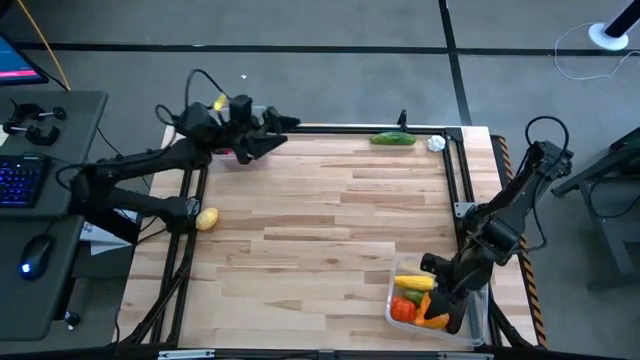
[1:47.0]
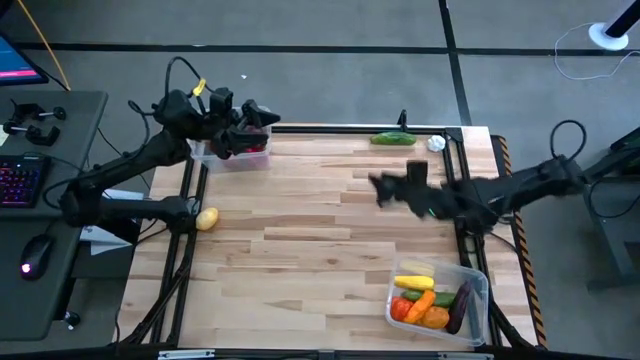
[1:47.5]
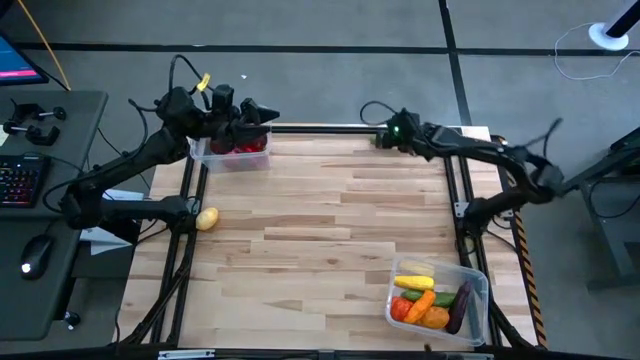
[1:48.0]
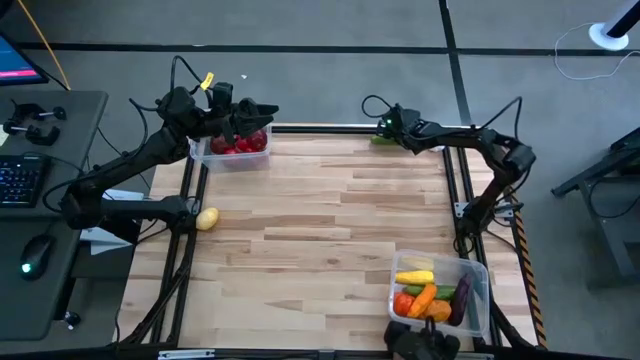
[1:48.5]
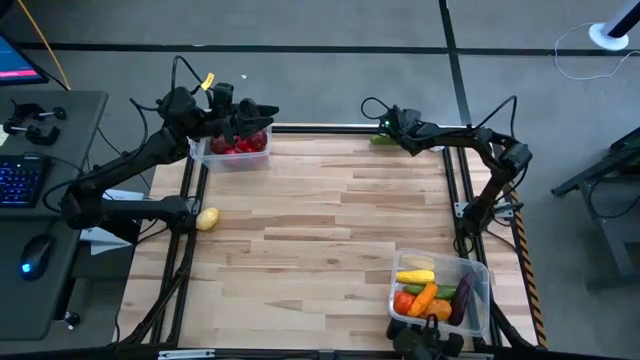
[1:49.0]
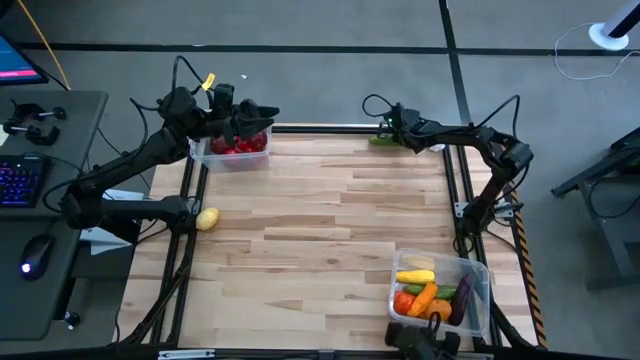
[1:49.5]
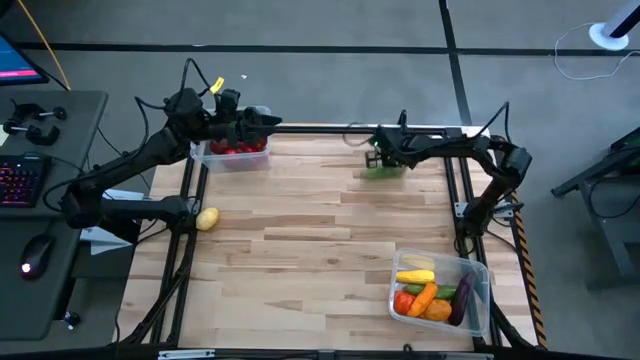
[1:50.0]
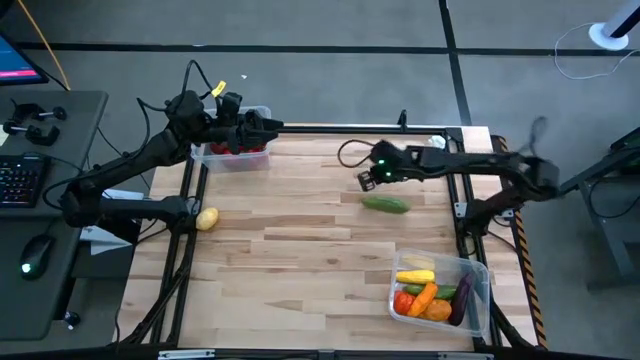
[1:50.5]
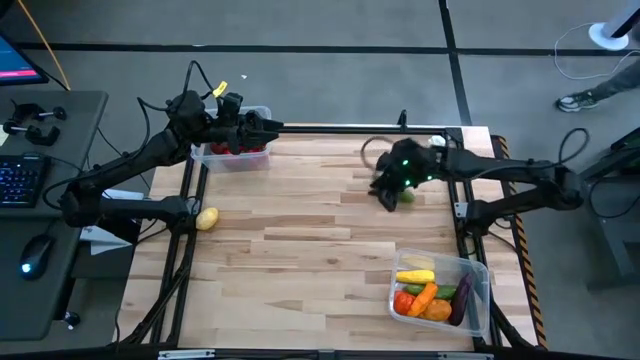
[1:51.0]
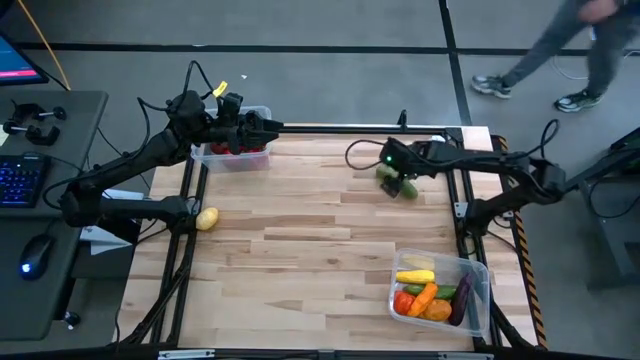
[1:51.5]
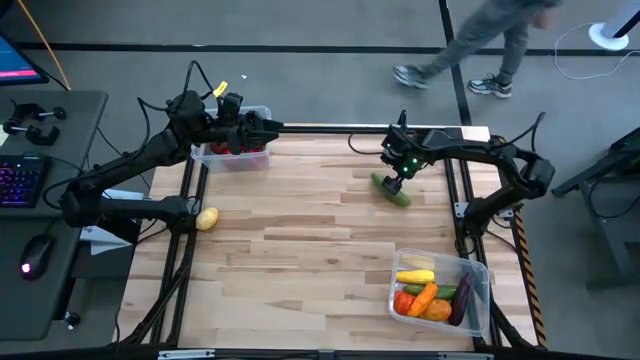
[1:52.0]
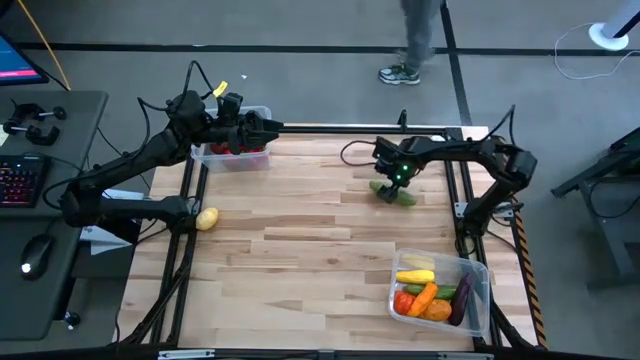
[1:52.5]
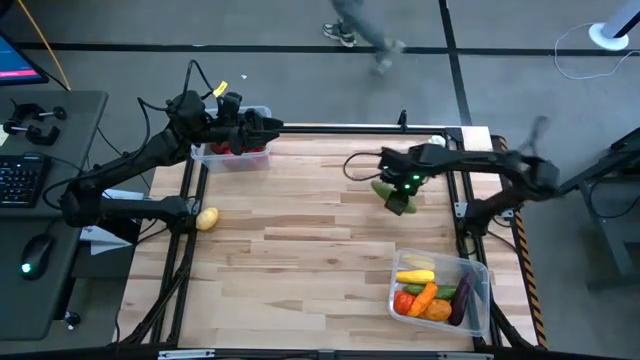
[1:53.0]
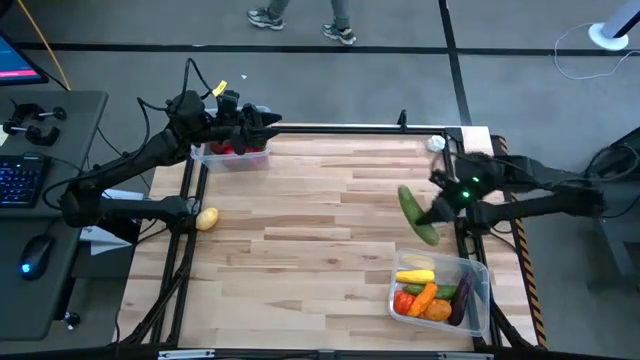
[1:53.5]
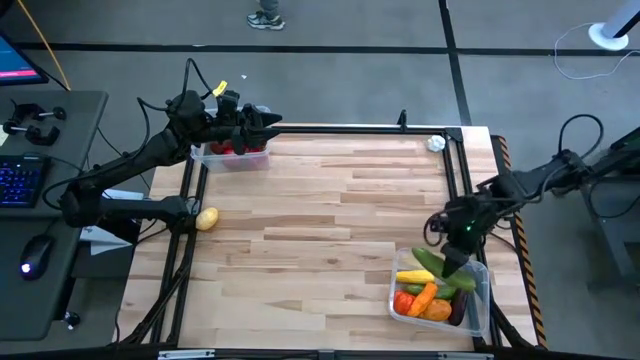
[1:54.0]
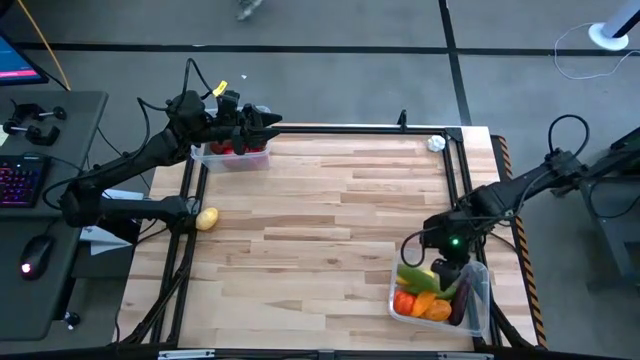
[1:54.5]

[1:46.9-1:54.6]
Task: Sort produce into baskets
Put the green cucumber into the bottom transparent bin

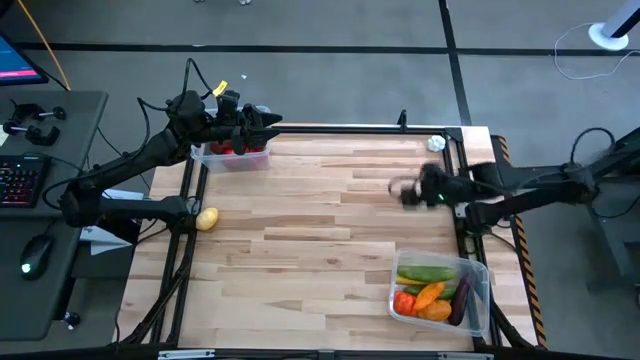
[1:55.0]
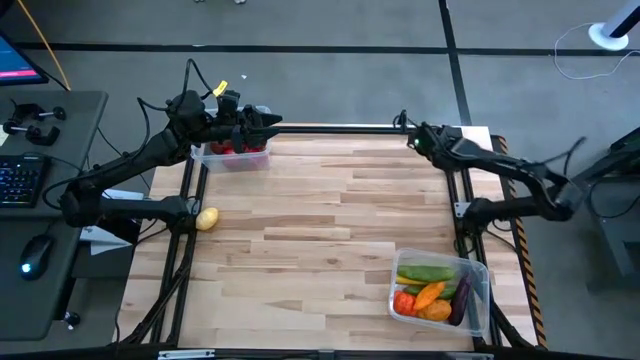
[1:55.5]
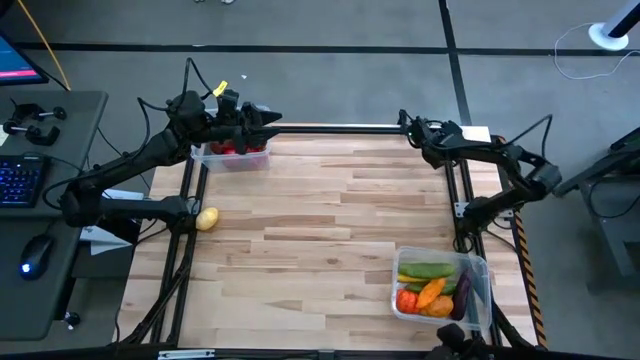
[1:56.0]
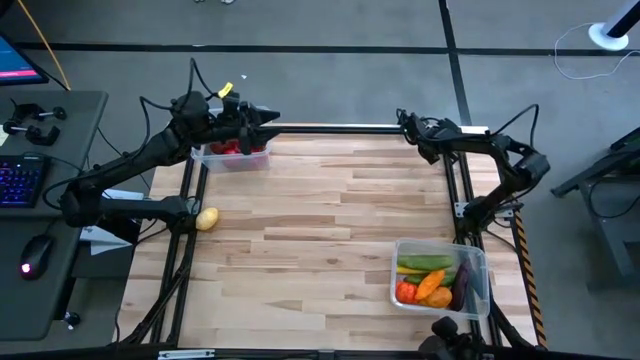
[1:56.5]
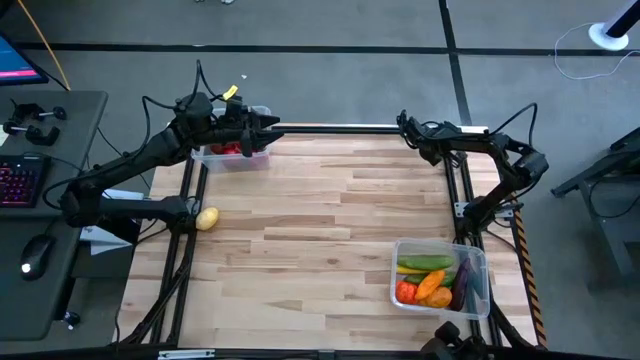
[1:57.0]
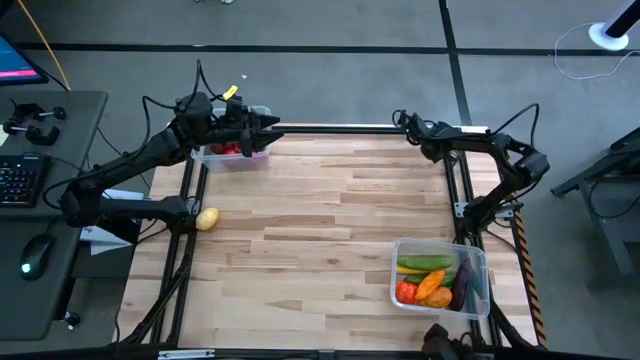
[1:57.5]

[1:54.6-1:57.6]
Put the white garlic into the bottom transparent bin

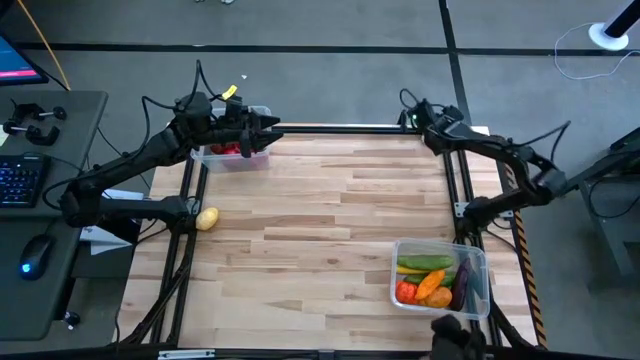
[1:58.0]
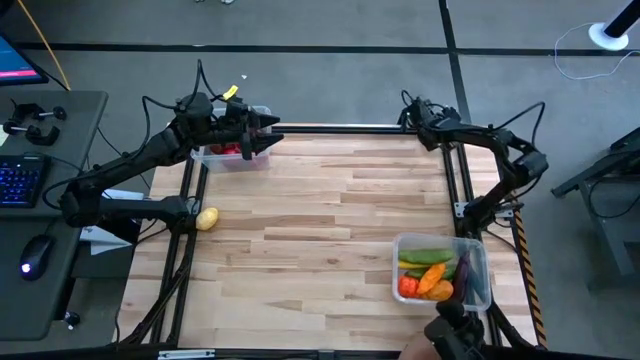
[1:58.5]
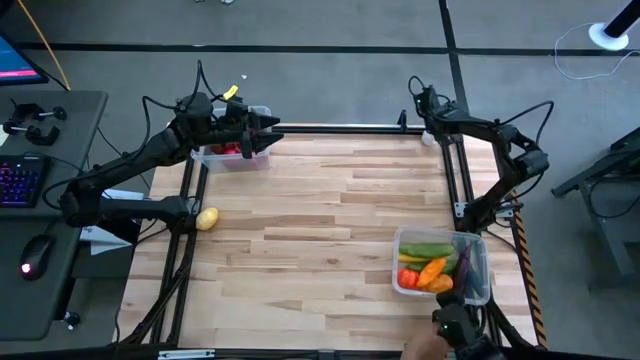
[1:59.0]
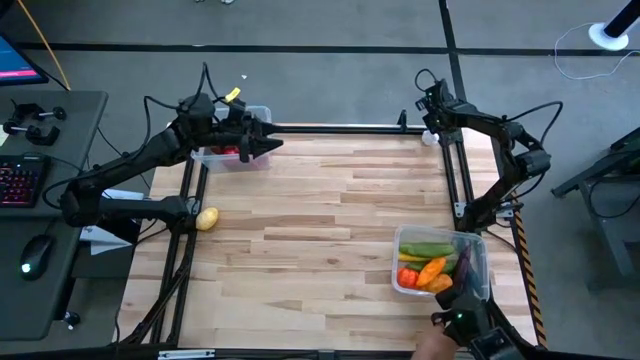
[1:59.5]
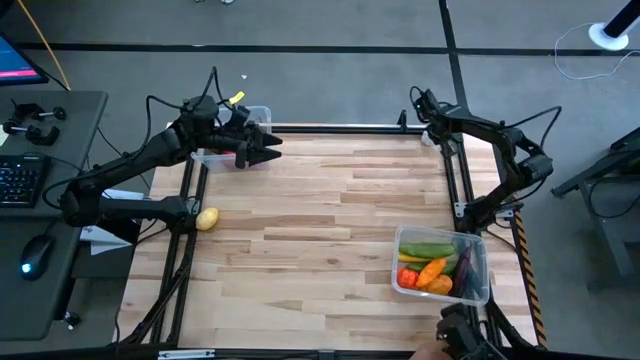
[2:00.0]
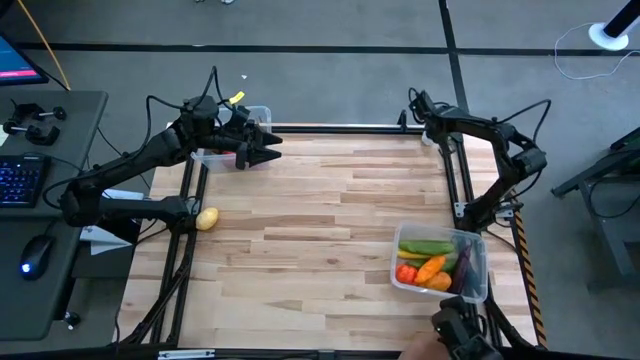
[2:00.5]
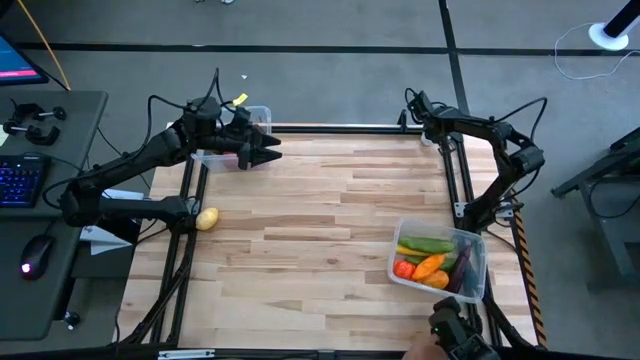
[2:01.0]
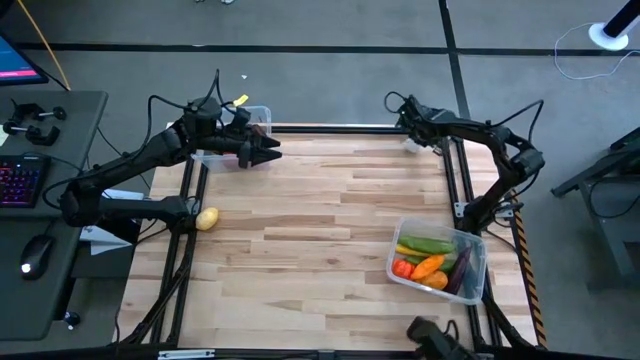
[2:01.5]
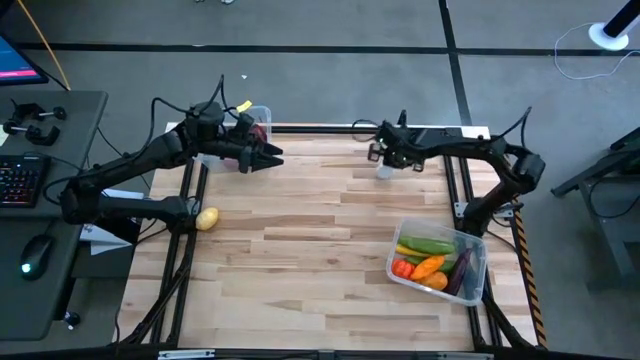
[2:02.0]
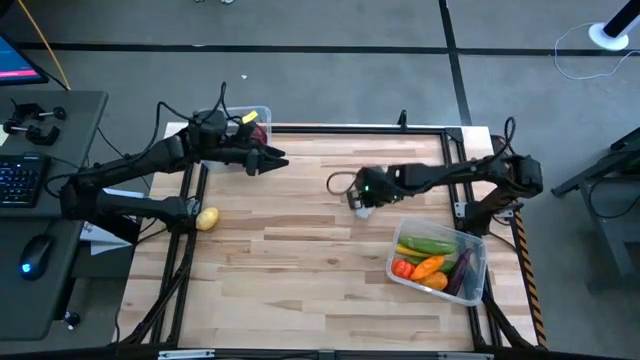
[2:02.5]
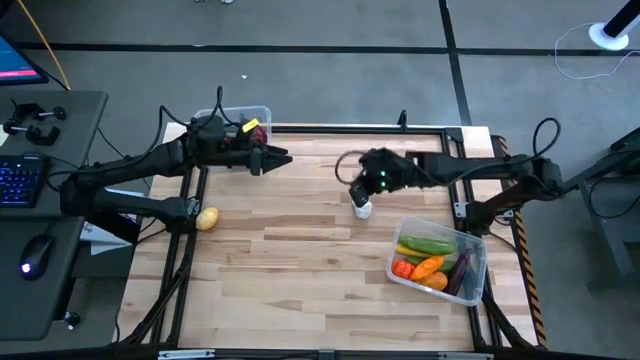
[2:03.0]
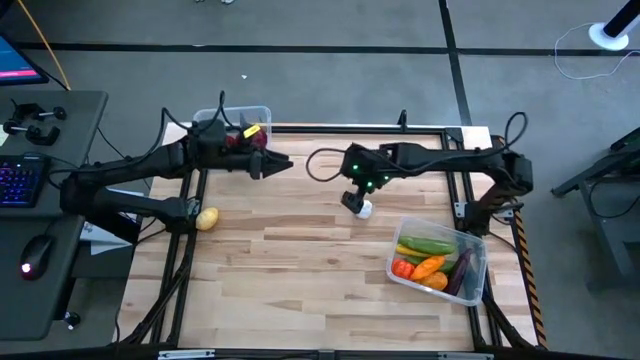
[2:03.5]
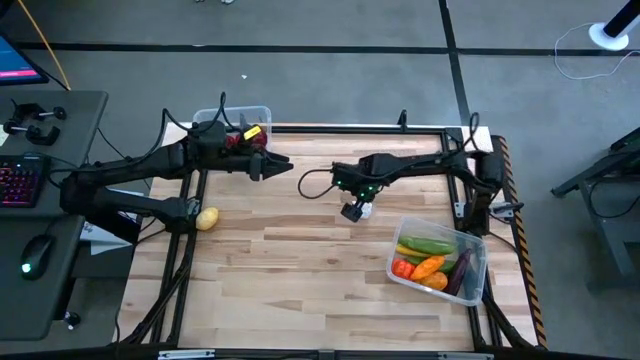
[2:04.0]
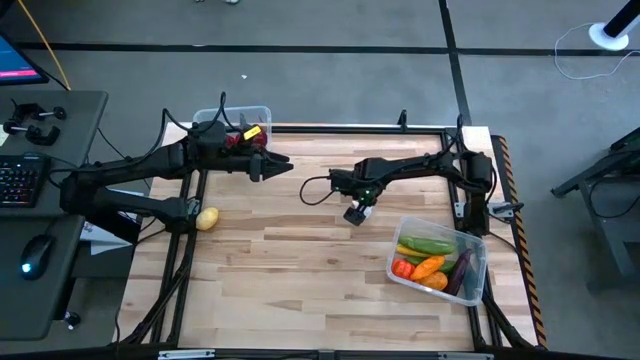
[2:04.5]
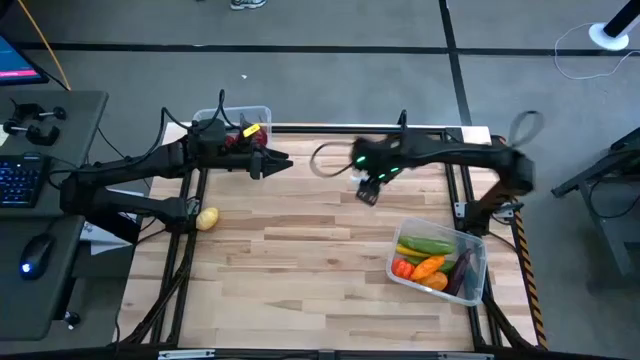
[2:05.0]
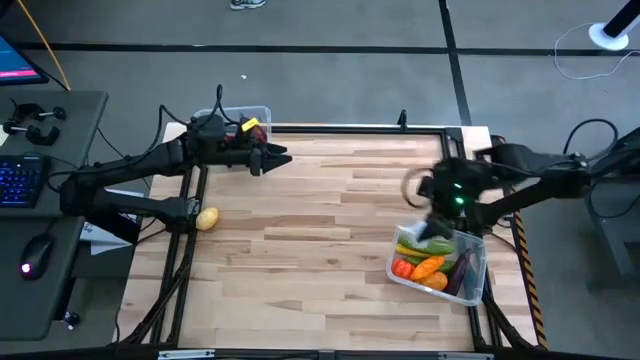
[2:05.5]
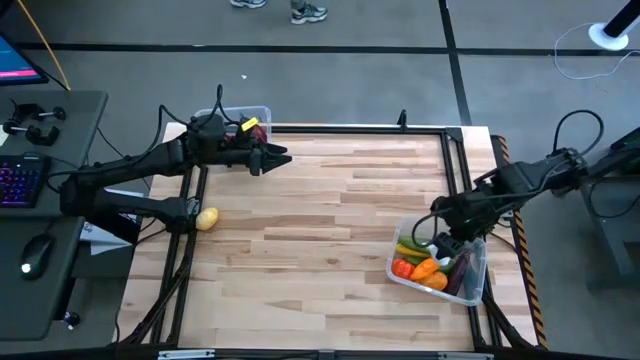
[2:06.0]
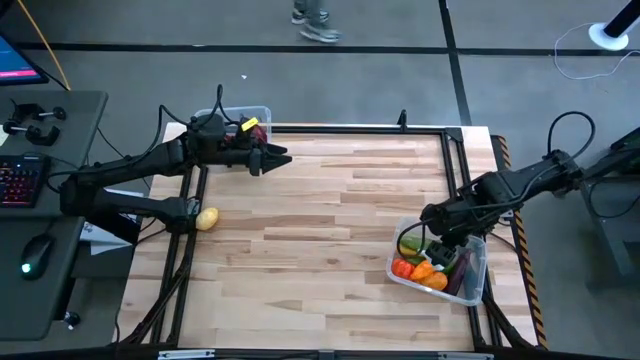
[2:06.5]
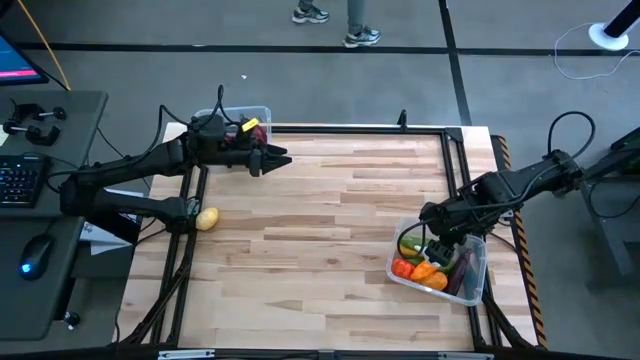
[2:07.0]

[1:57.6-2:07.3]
Put the white garlic into the bottom transparent bin
